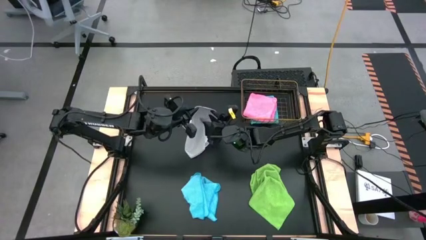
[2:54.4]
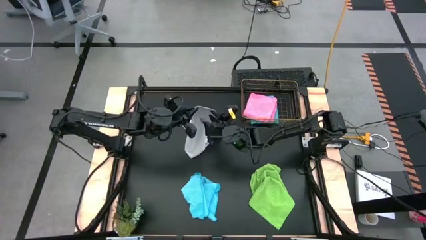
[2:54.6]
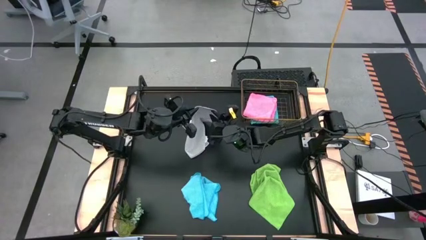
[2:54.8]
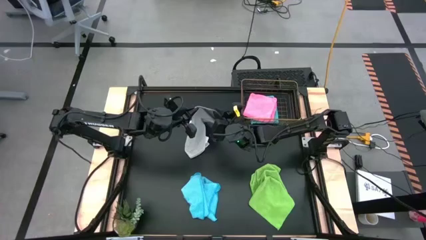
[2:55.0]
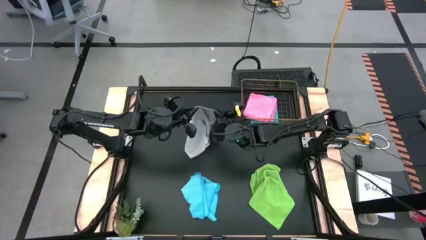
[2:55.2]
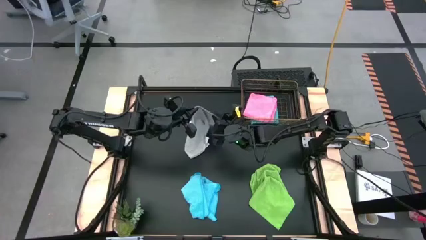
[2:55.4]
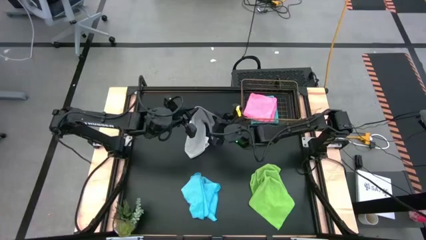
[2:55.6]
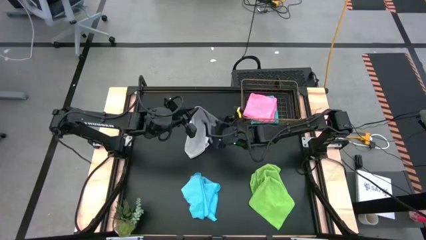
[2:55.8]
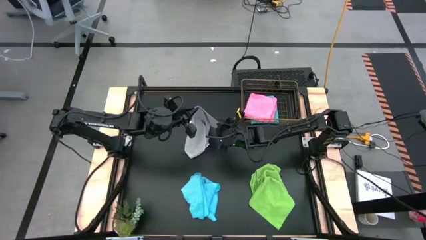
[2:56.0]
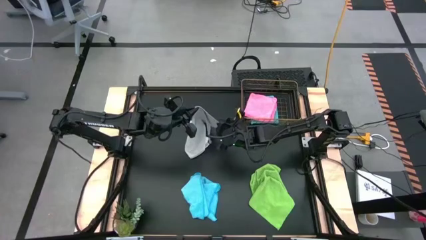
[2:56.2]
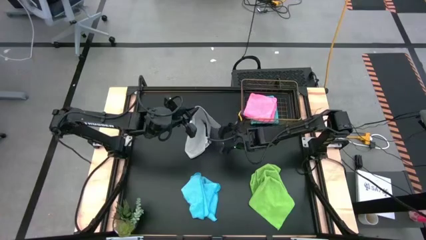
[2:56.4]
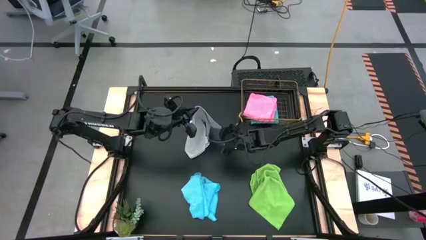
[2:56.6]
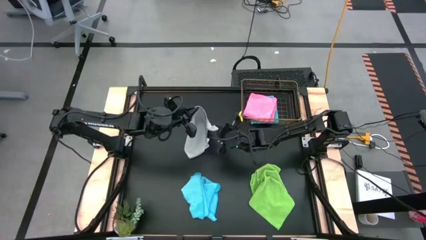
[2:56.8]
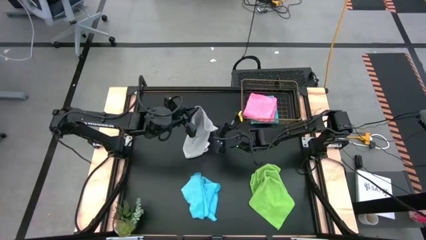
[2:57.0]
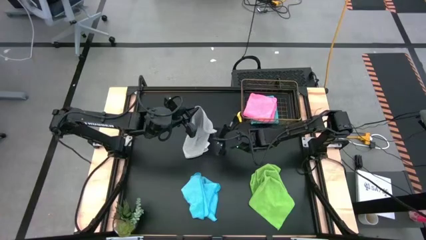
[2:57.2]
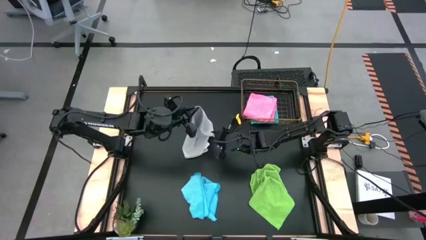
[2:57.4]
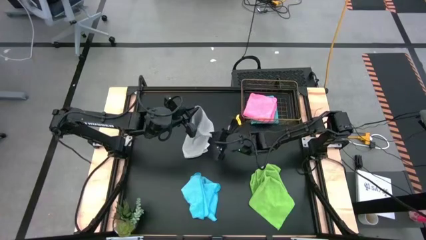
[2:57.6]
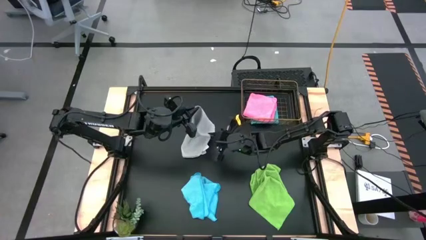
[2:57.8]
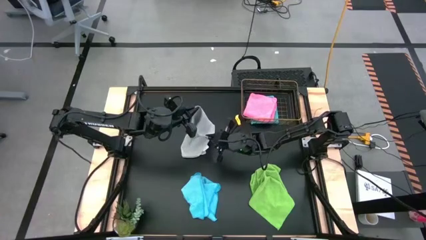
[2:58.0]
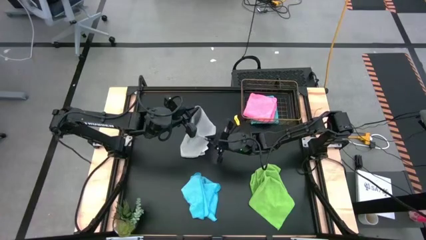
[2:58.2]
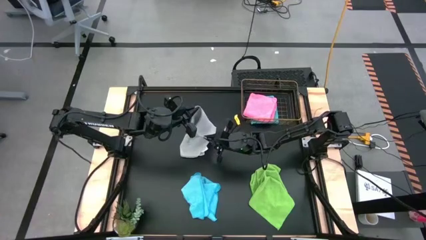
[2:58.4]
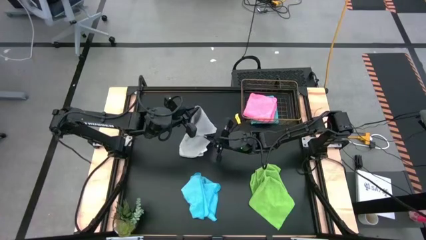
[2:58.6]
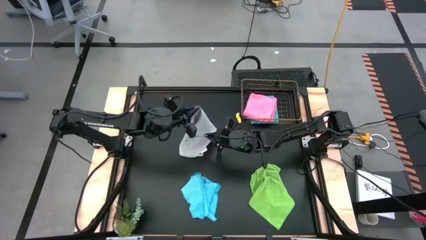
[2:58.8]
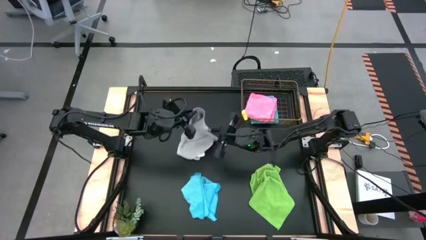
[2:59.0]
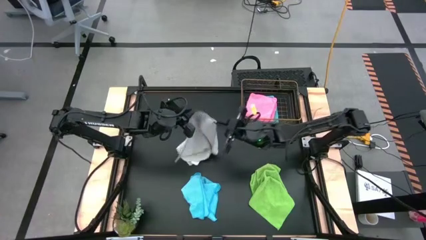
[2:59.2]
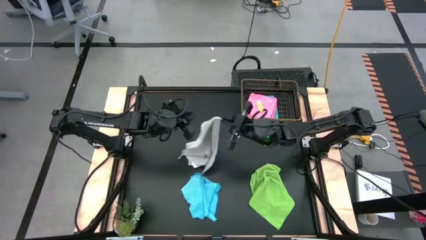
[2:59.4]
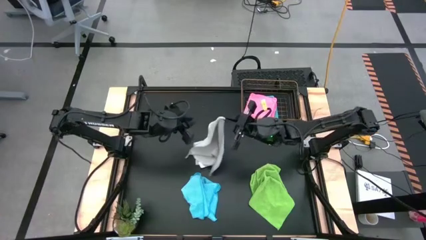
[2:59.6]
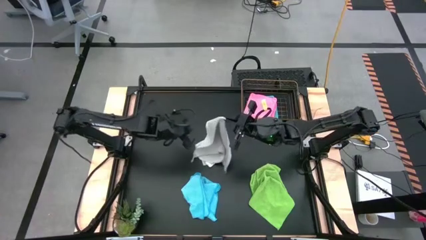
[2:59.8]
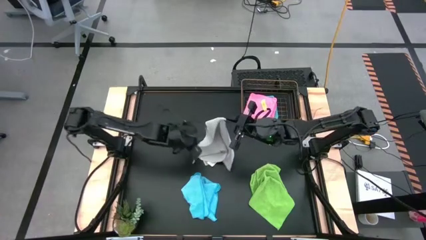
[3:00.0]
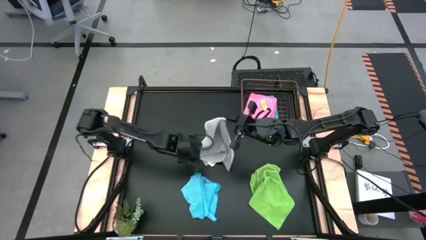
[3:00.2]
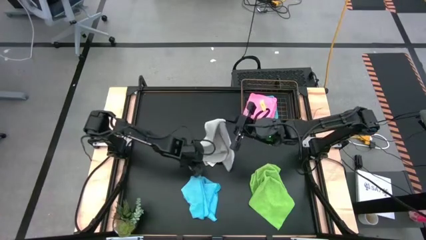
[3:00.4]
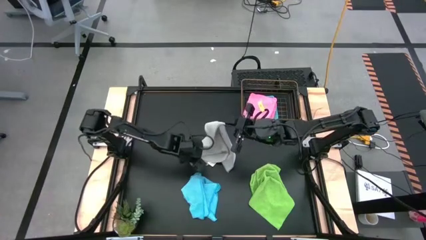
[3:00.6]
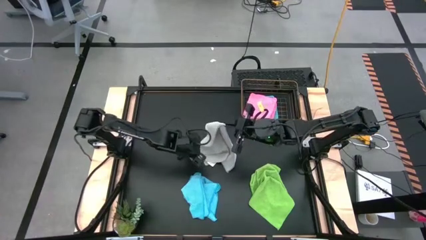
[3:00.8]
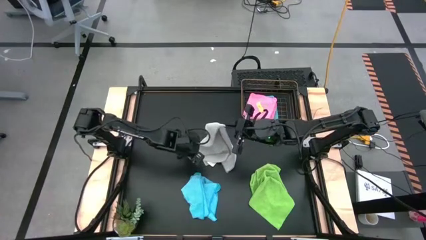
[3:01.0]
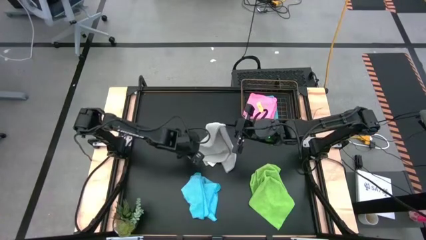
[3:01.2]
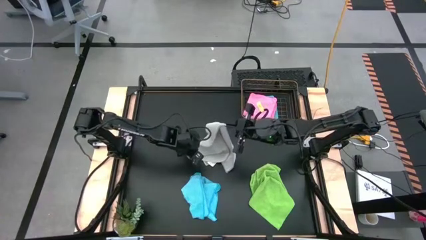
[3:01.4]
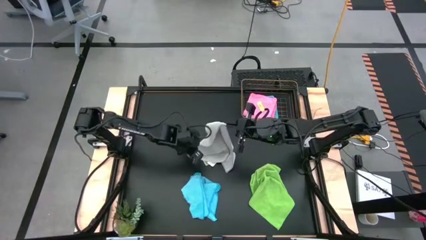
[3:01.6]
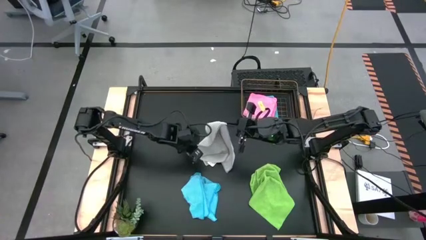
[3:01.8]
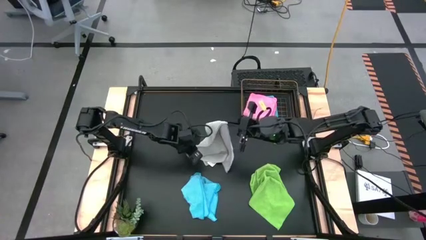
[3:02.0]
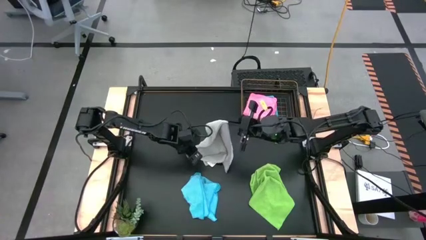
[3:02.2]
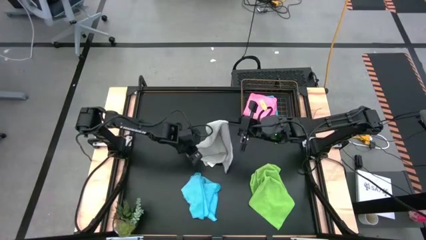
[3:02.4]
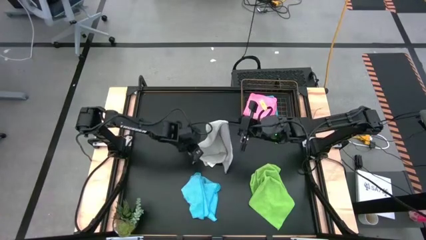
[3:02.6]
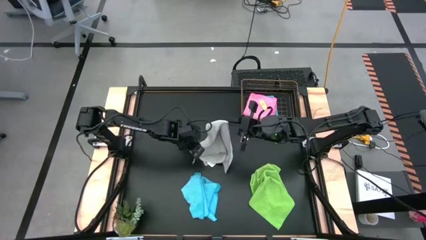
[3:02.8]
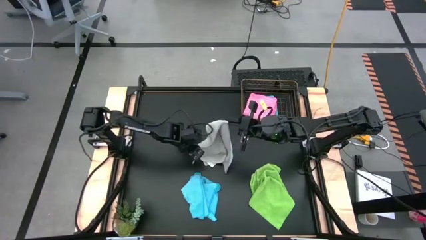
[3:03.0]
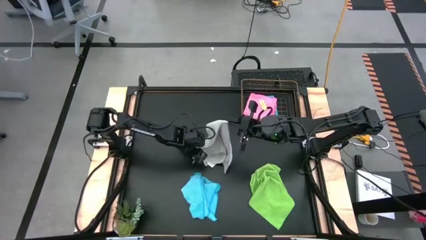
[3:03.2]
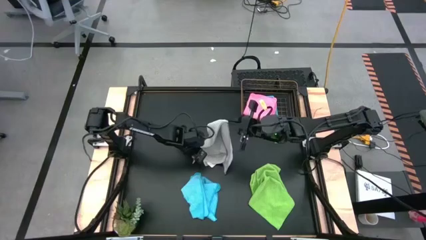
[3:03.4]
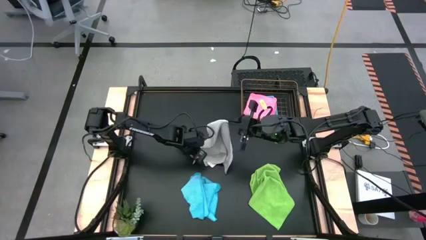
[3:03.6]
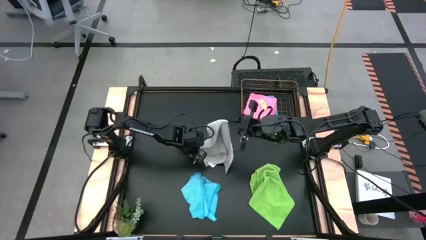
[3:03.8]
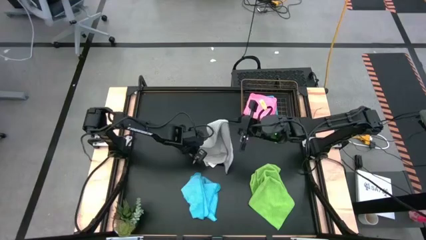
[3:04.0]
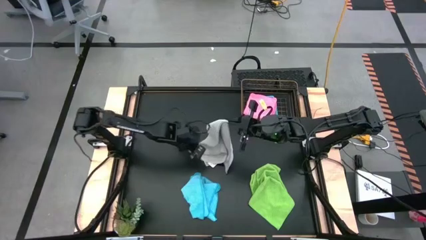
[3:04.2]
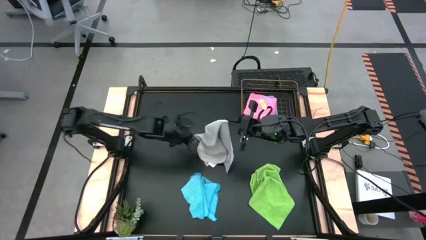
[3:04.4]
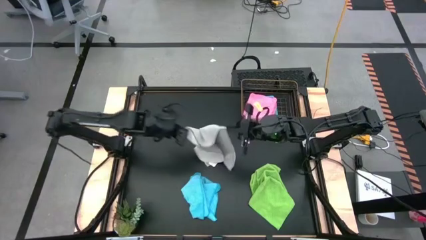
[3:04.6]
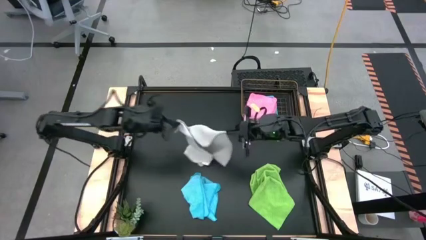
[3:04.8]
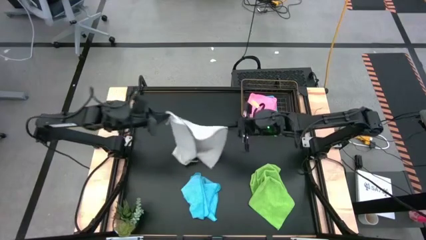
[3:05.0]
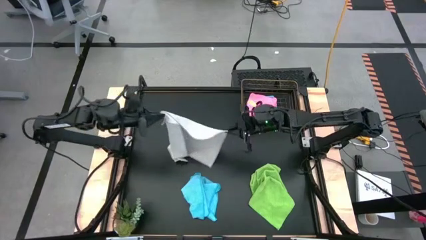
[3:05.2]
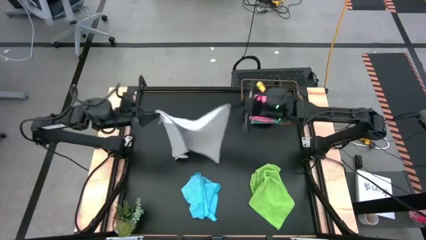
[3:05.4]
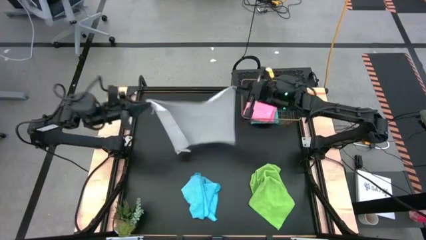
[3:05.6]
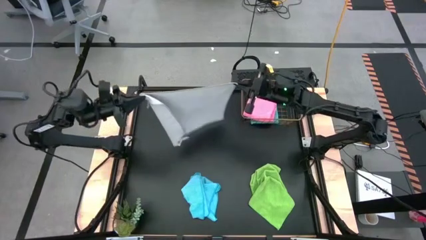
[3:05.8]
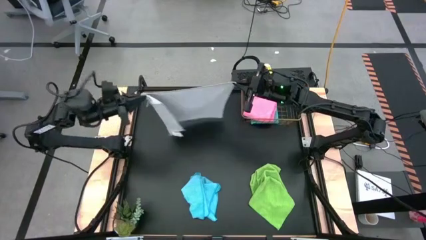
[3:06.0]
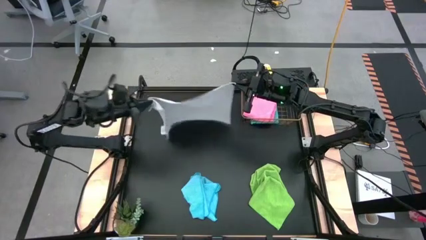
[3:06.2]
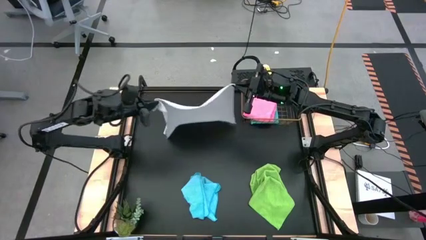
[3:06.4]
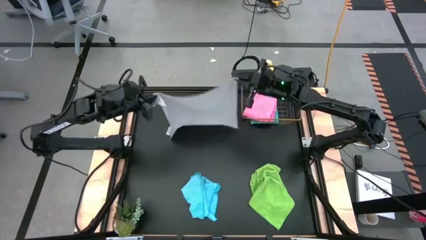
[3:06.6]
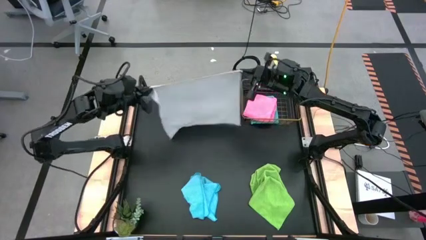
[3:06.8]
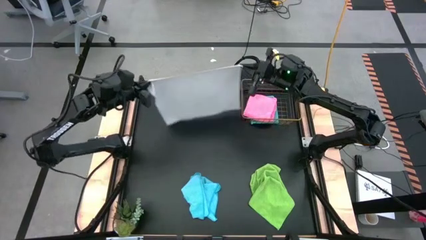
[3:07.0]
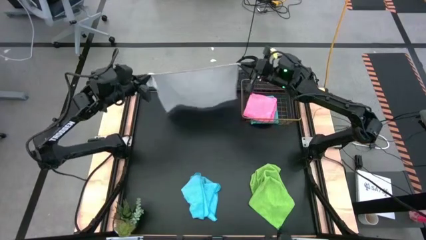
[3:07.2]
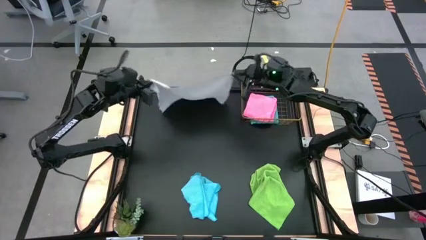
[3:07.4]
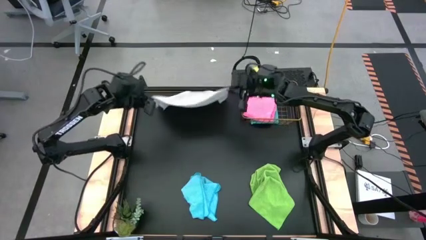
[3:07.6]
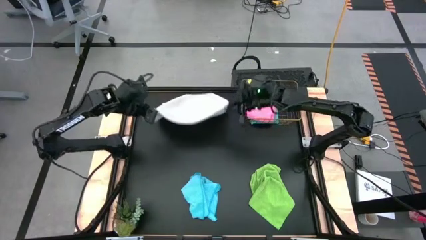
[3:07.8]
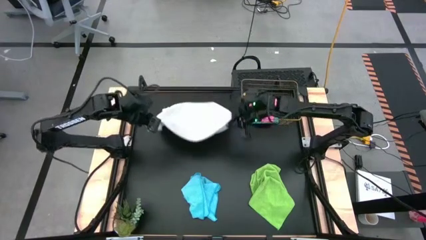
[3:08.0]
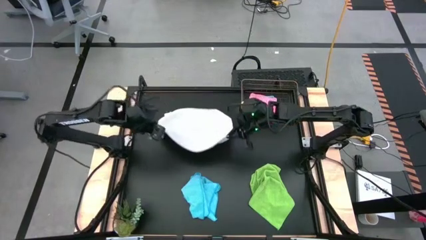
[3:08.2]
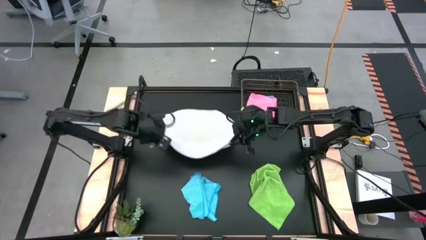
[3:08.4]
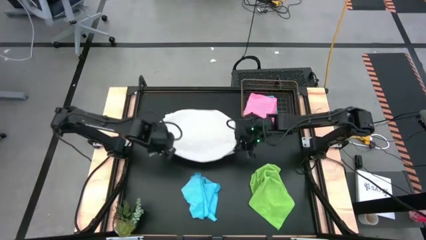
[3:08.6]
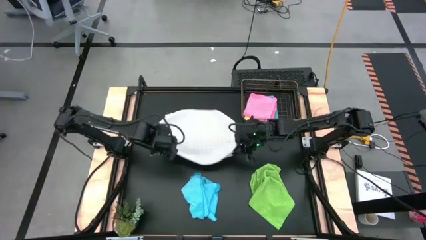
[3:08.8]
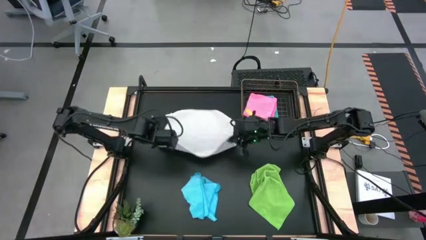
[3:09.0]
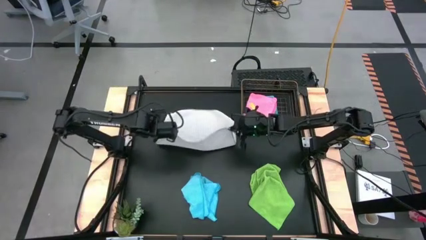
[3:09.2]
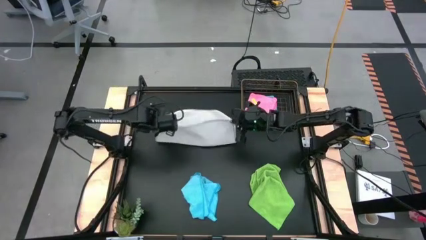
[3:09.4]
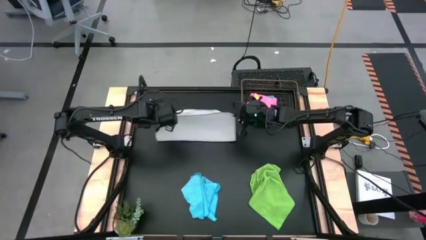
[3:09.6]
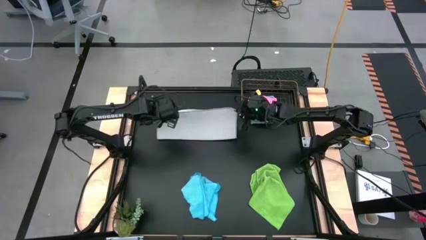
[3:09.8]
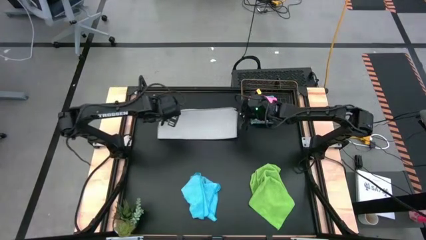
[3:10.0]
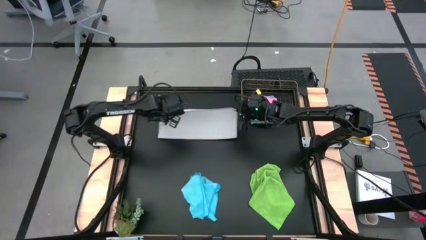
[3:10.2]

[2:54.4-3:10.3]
Task: Fold microfiber towels
Fold the gray towel

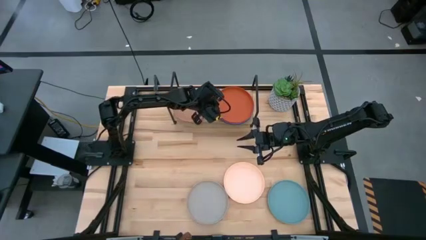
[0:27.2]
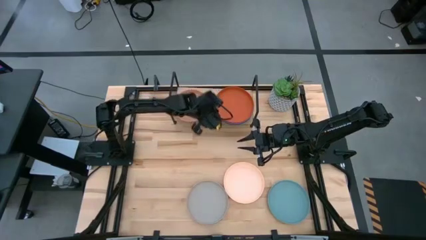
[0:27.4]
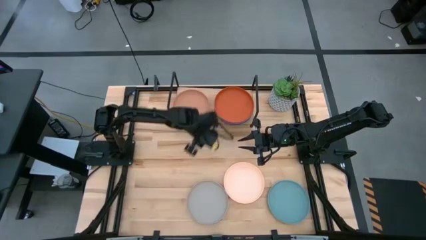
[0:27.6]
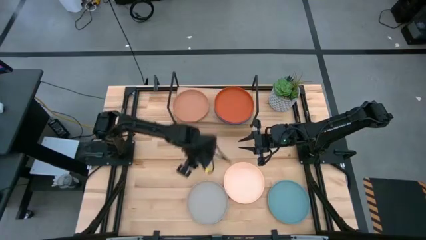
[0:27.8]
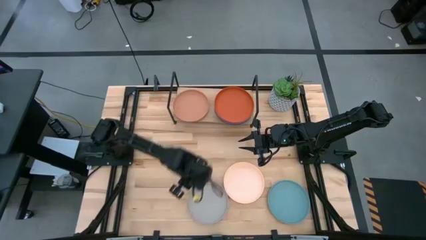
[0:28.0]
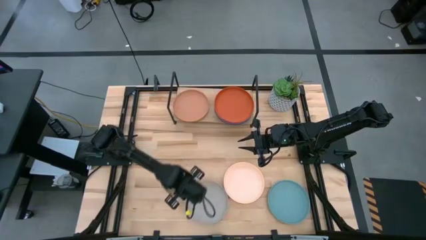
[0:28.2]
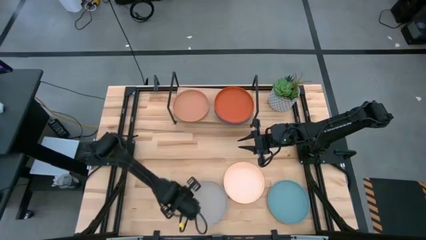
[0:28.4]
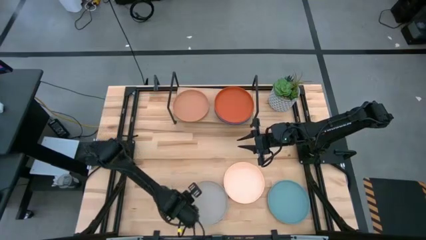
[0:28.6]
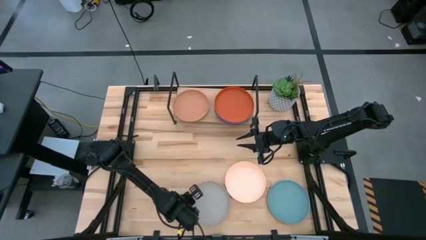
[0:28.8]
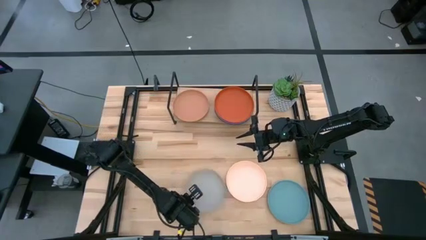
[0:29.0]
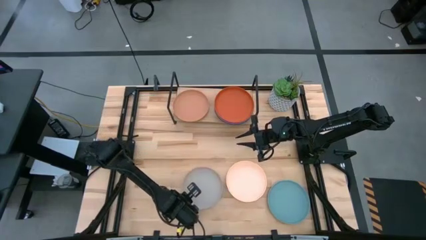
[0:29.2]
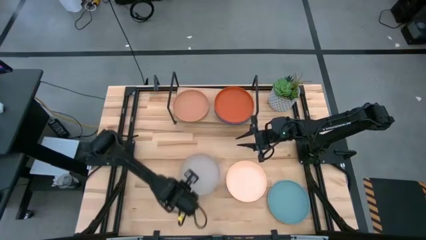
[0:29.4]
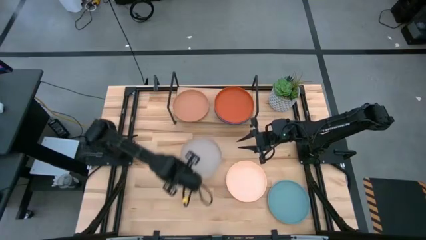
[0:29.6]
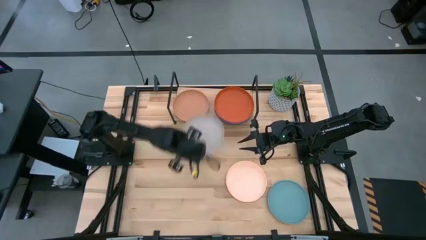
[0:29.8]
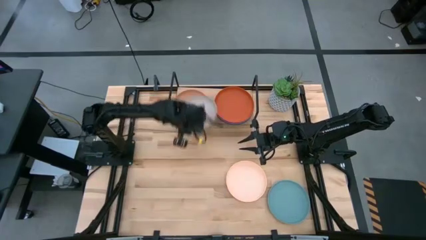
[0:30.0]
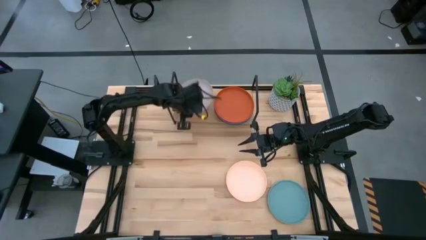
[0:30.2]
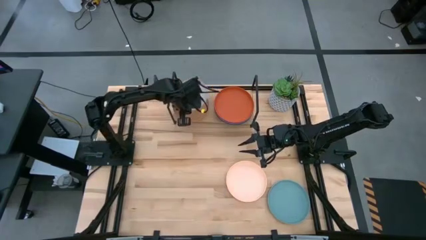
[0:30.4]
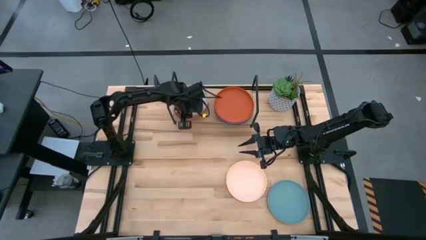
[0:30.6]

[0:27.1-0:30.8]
Task: Place and stack plates onto a shelf
Stack the gray plate on top of the brown plate on the shelf
